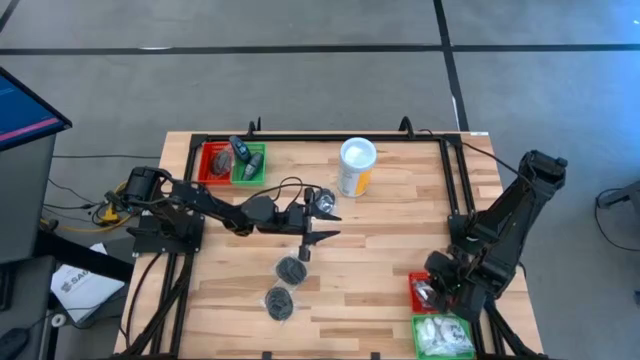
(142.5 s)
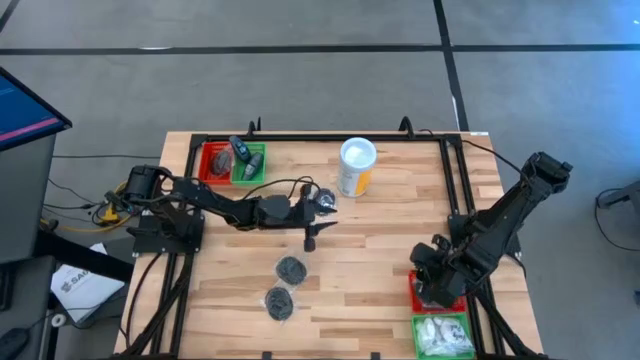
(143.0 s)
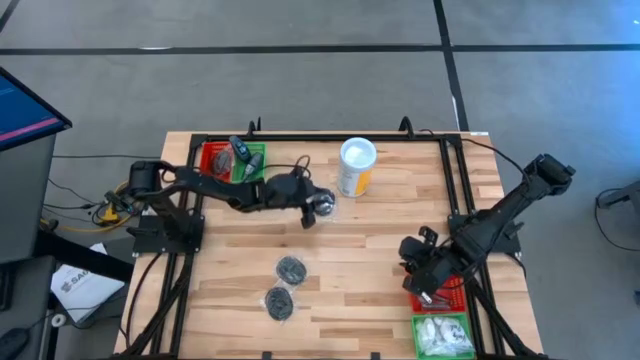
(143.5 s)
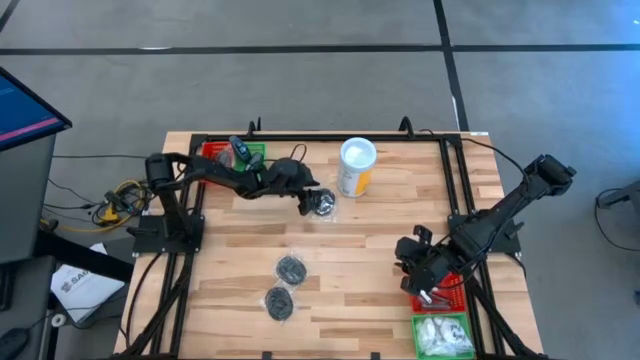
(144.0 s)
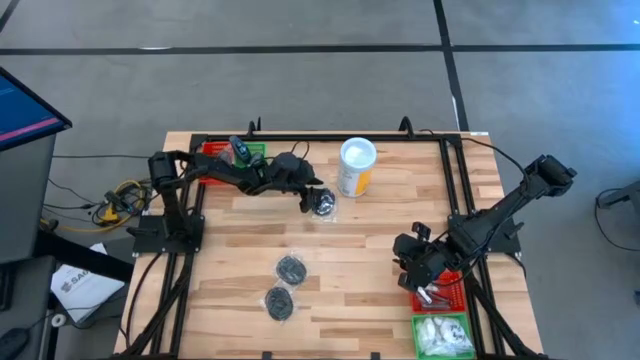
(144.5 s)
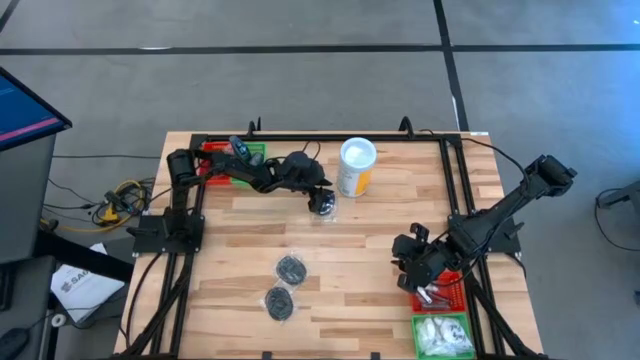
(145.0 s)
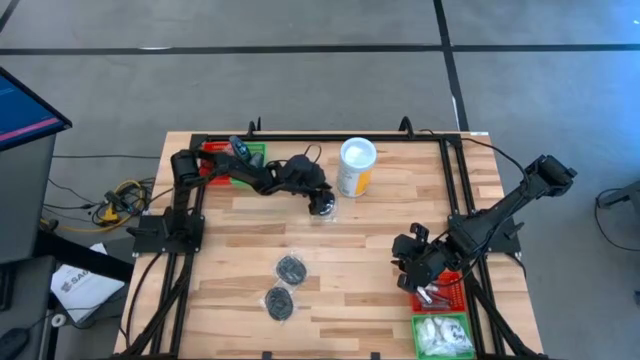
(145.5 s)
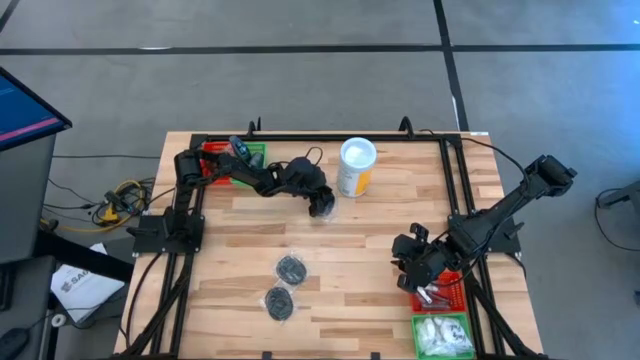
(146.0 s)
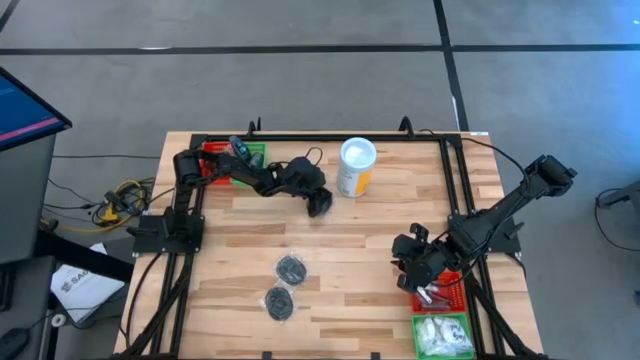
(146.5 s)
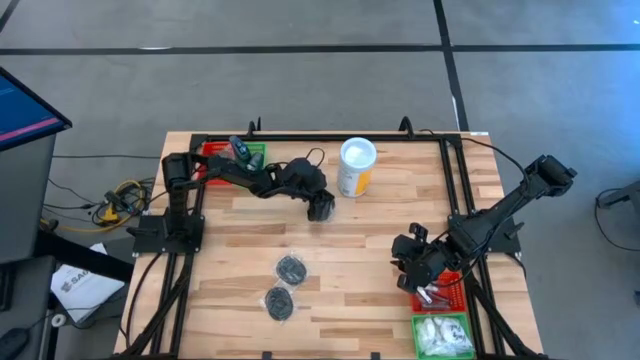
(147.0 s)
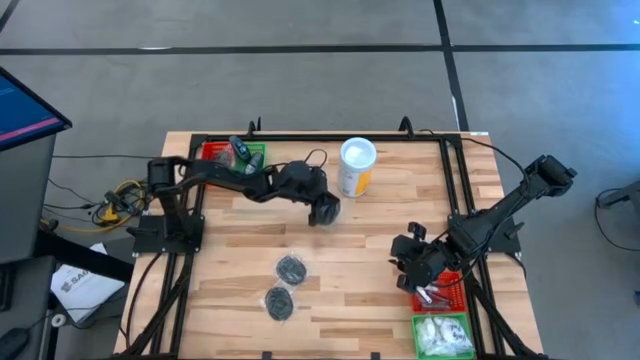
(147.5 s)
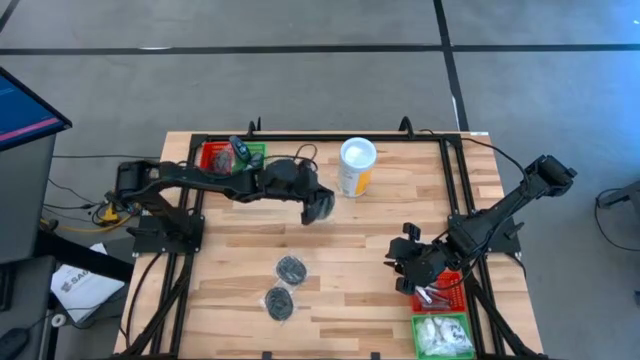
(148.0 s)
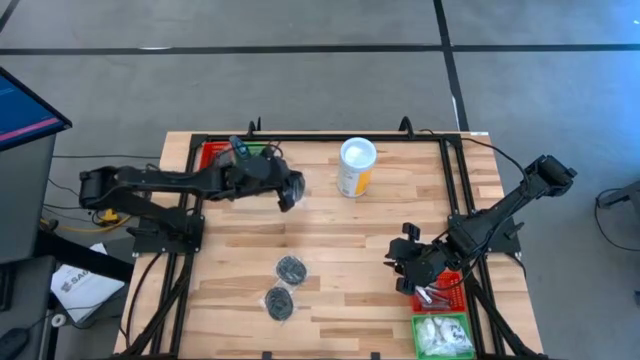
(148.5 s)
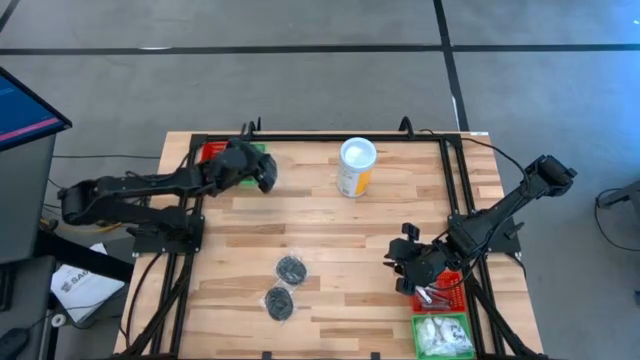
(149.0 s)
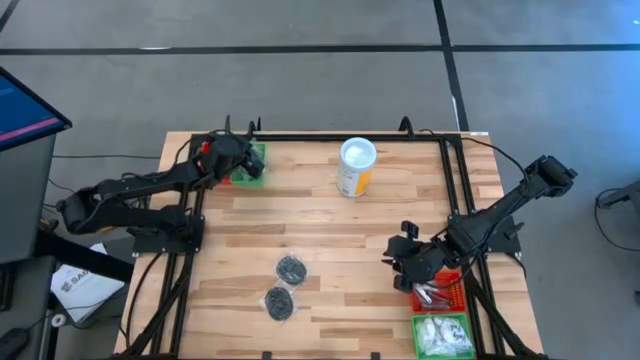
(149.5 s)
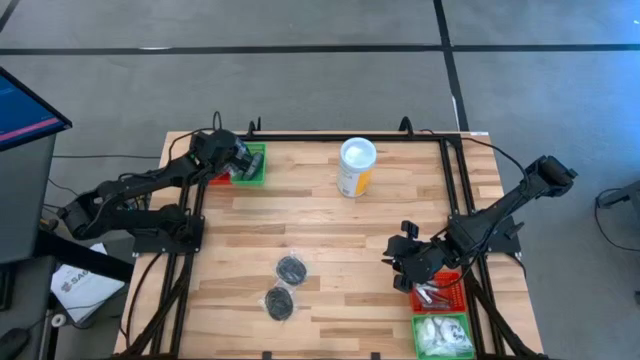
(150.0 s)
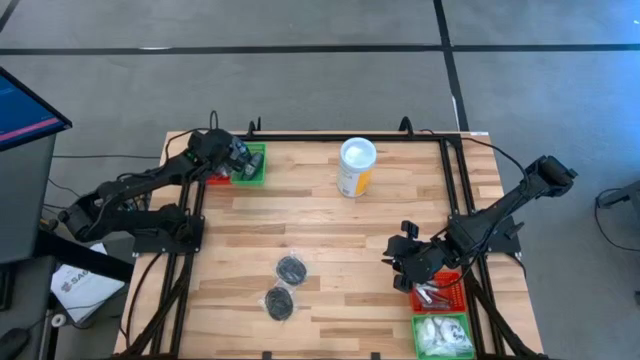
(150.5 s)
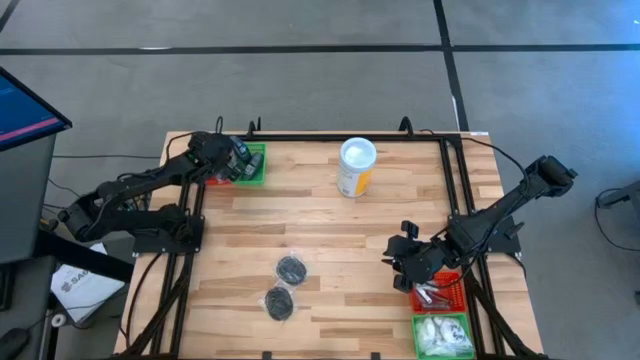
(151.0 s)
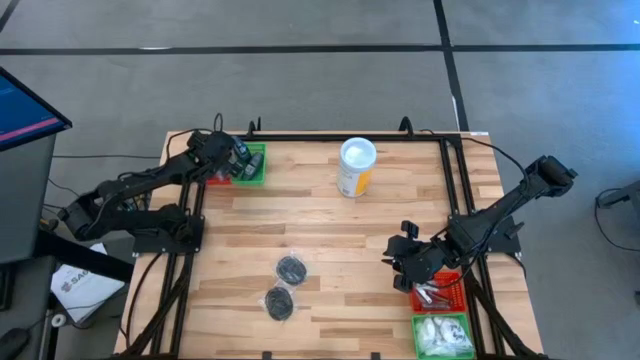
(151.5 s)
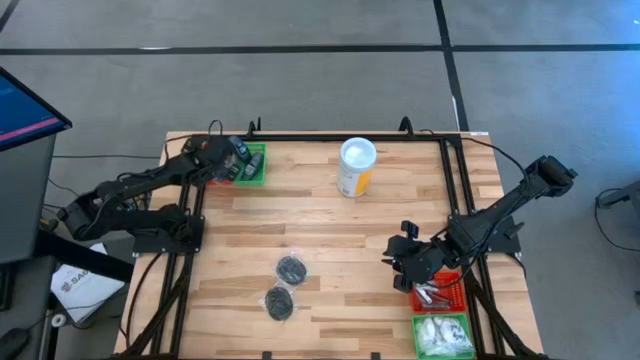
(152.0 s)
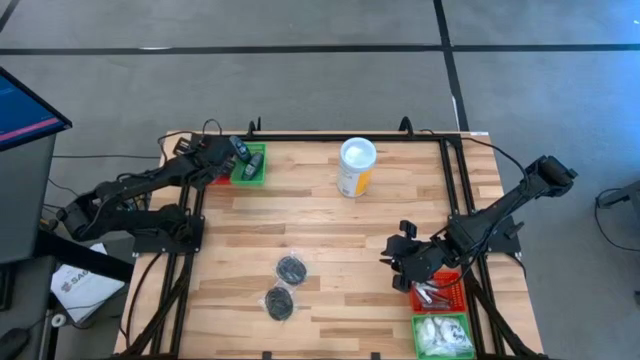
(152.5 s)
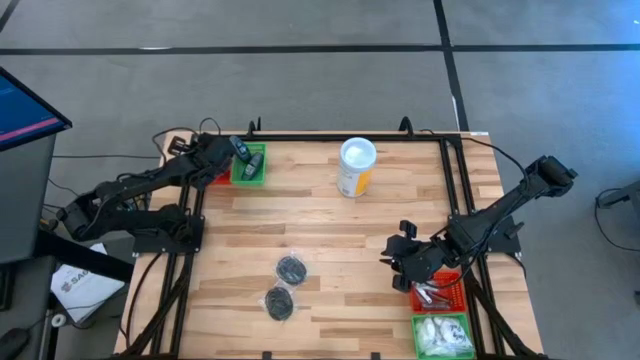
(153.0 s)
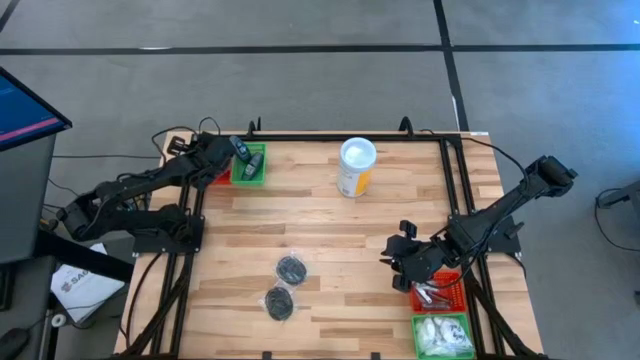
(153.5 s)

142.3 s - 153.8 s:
Task: Pick & Place Travel size toiletries
Put the black hairbrush into the top red bin

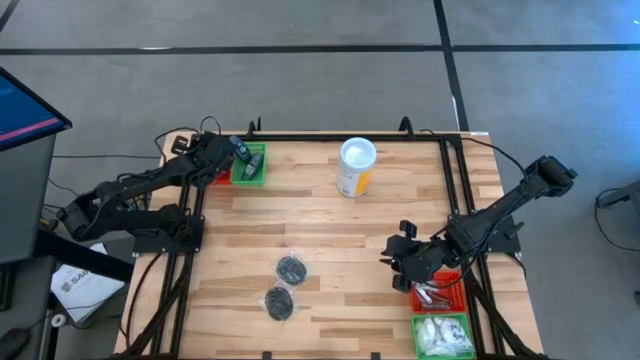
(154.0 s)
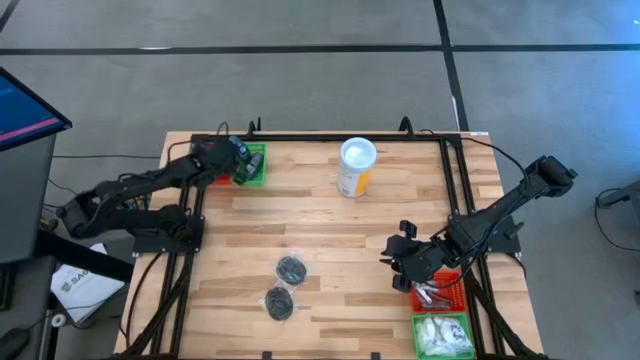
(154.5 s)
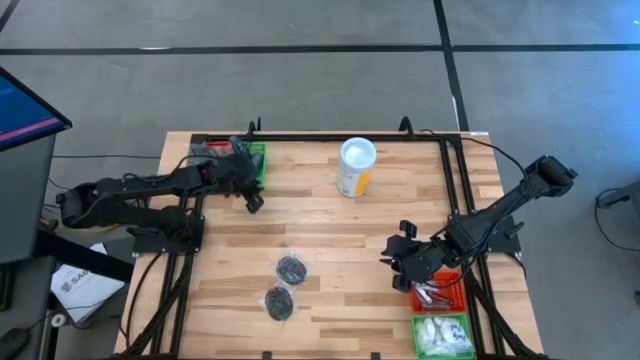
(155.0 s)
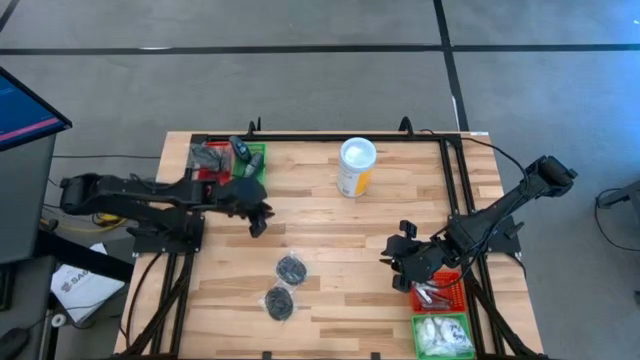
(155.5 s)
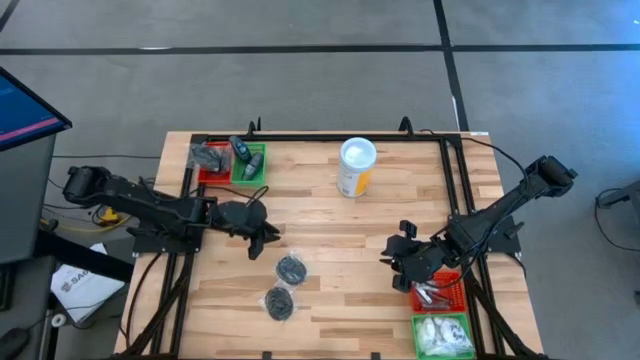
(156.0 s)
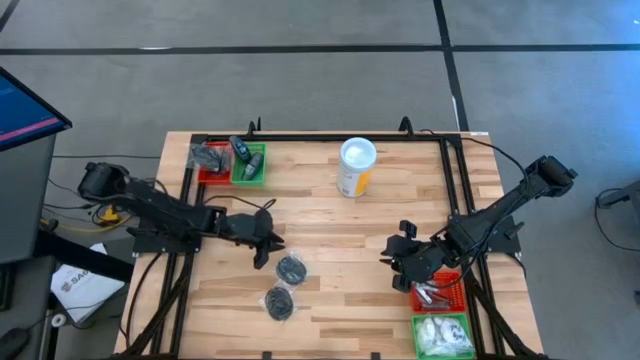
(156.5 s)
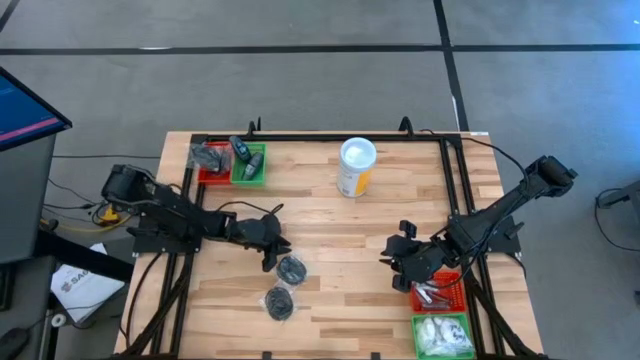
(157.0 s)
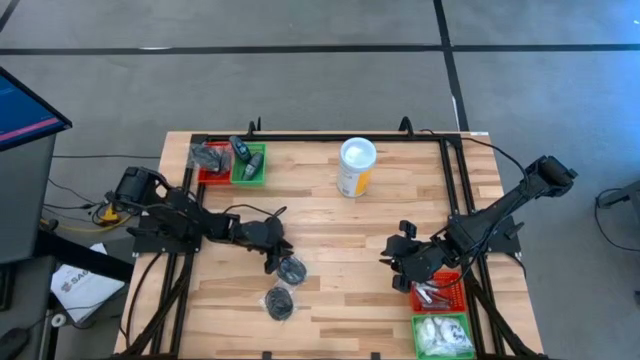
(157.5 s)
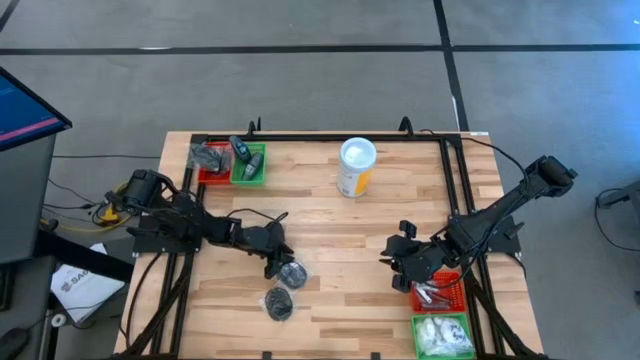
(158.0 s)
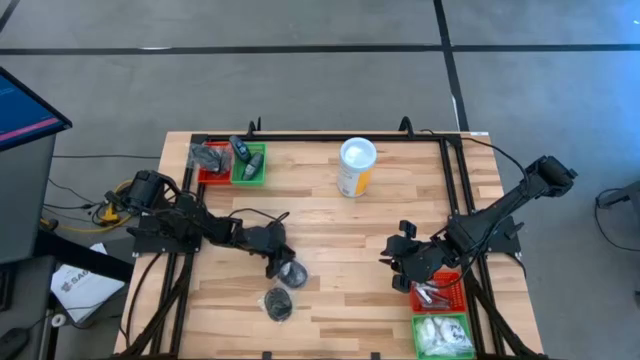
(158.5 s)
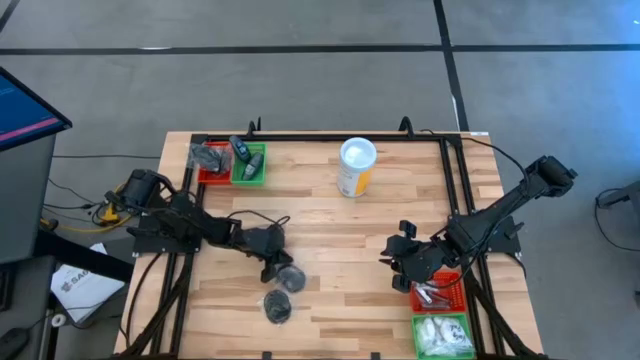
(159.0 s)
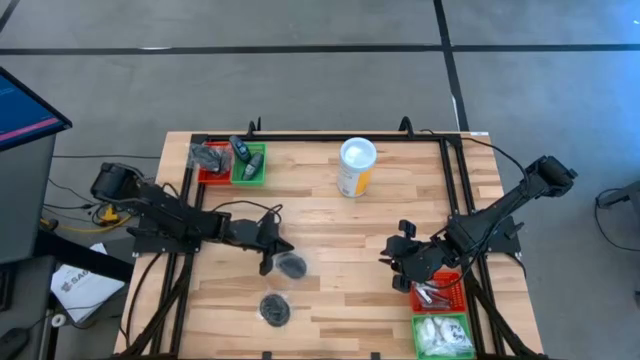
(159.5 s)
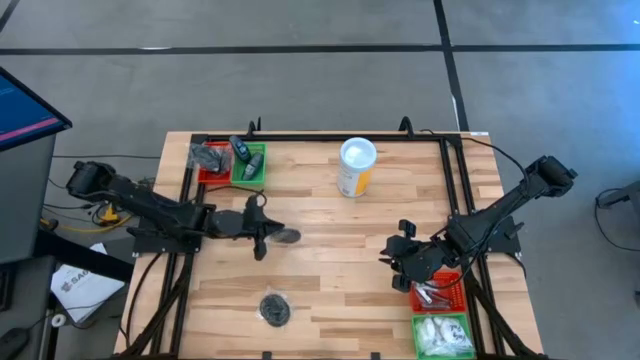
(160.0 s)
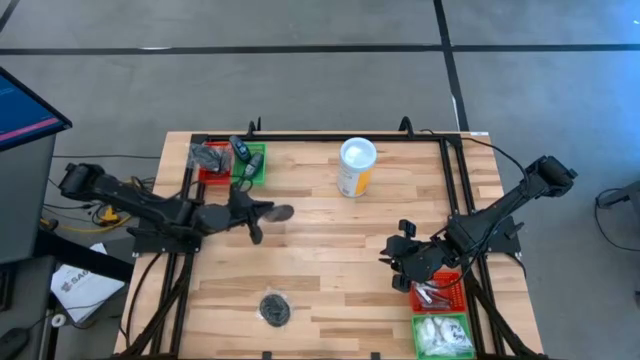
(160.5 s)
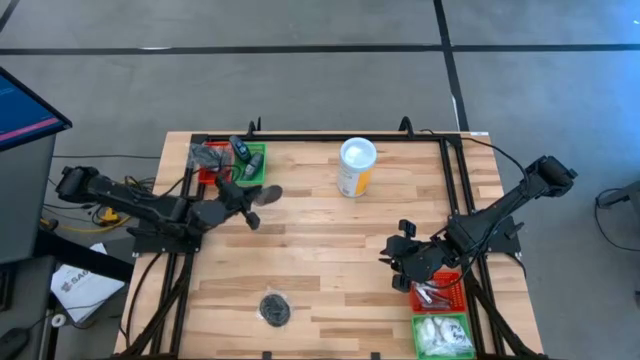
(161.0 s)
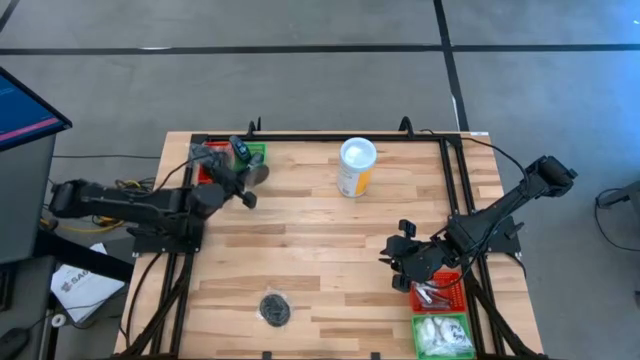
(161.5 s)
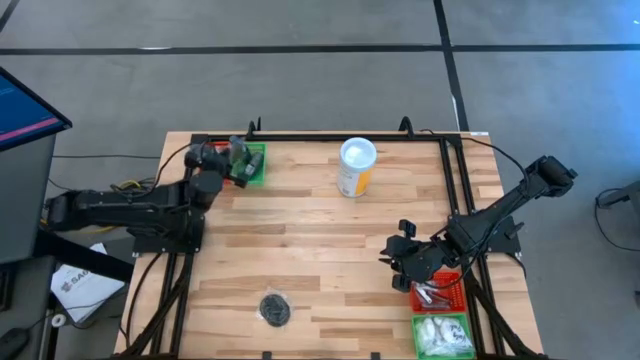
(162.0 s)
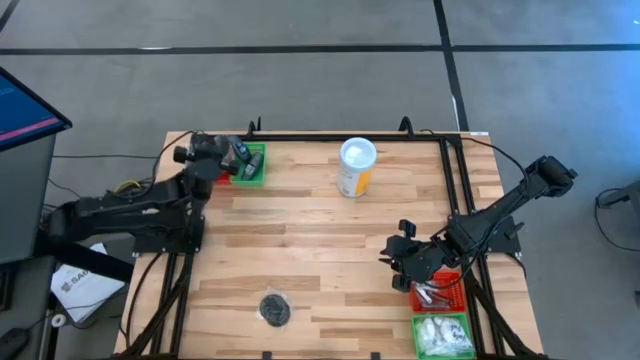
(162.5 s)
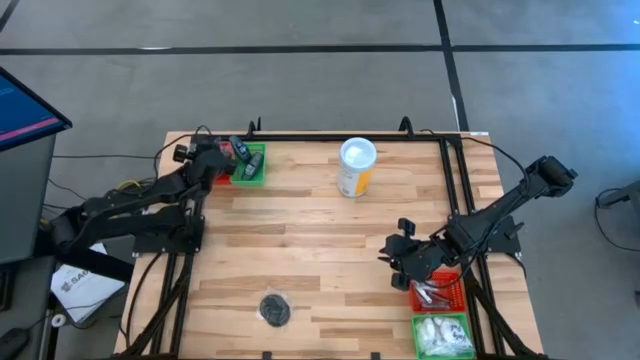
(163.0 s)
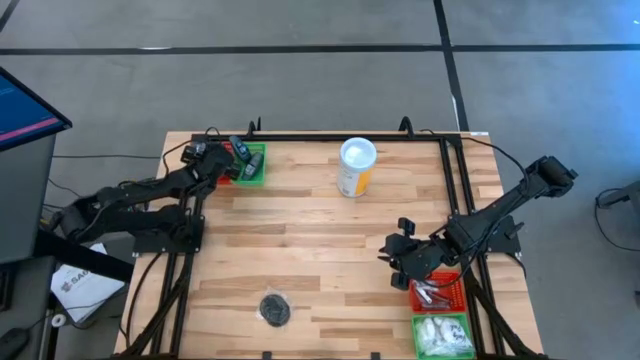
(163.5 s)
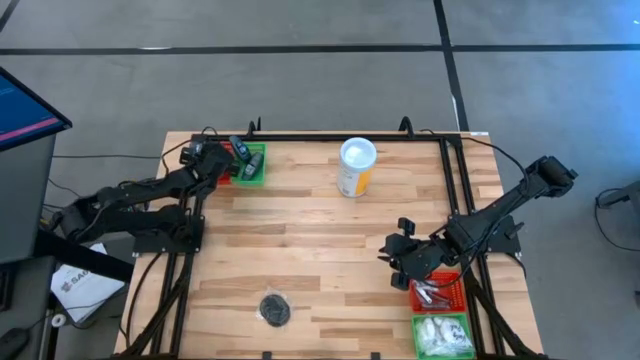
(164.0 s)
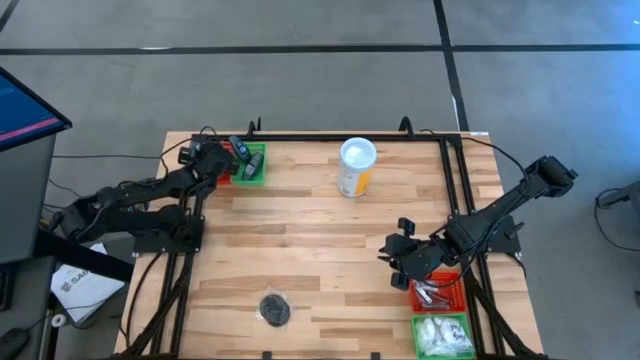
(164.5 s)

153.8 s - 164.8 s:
Put the black hairbrush into the top red bin
